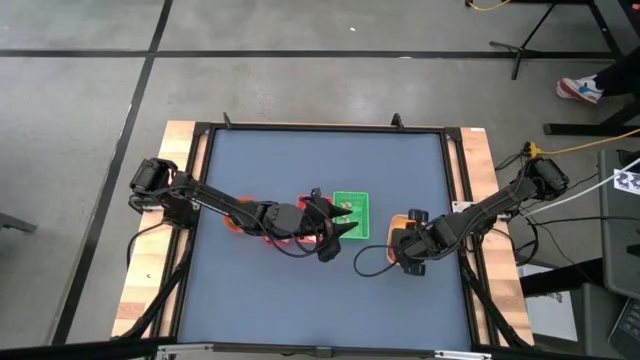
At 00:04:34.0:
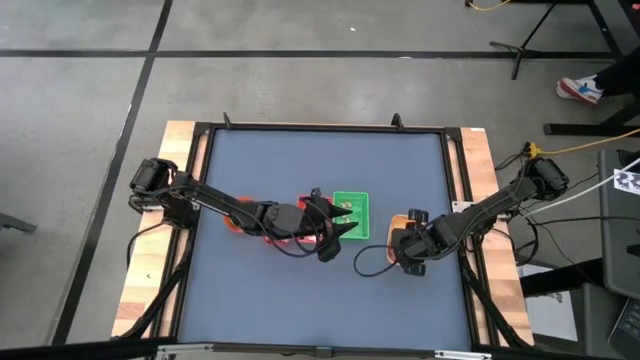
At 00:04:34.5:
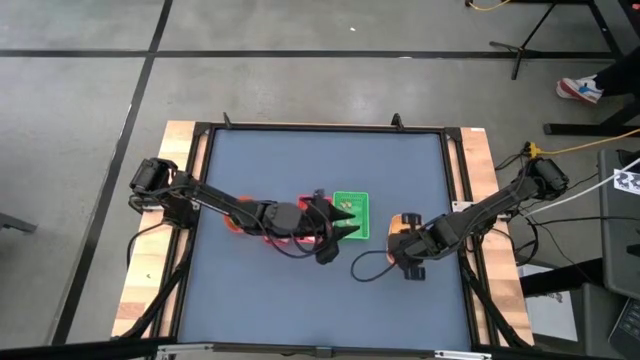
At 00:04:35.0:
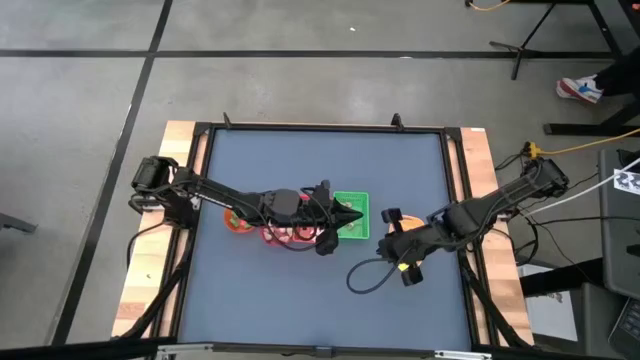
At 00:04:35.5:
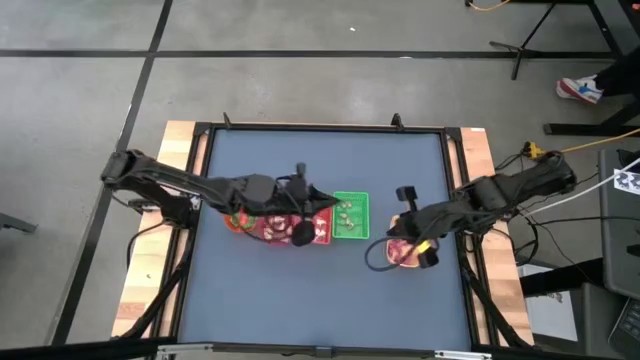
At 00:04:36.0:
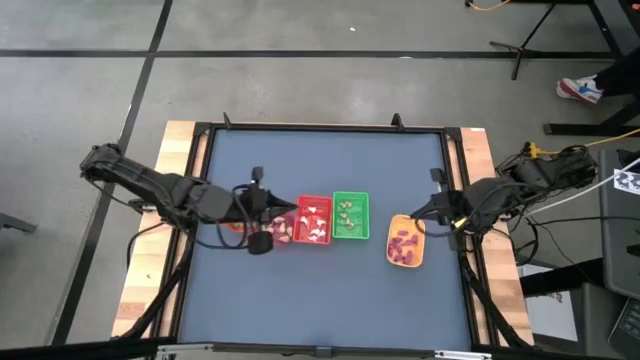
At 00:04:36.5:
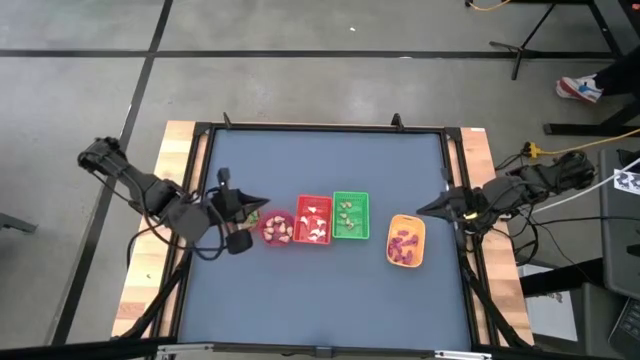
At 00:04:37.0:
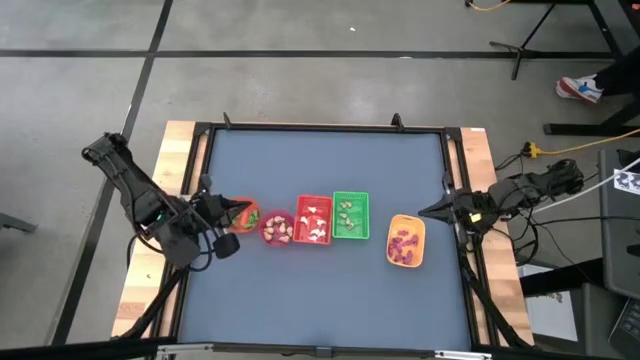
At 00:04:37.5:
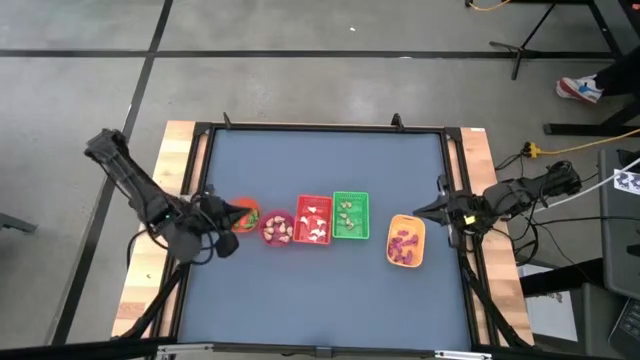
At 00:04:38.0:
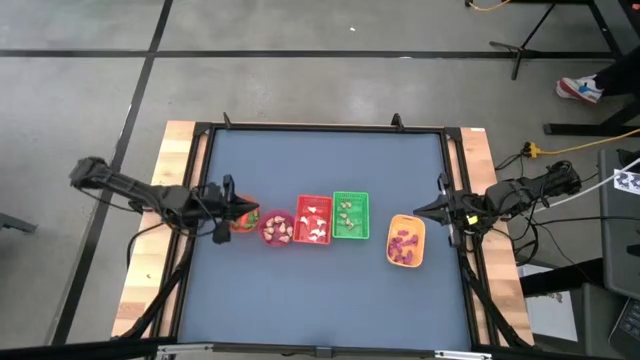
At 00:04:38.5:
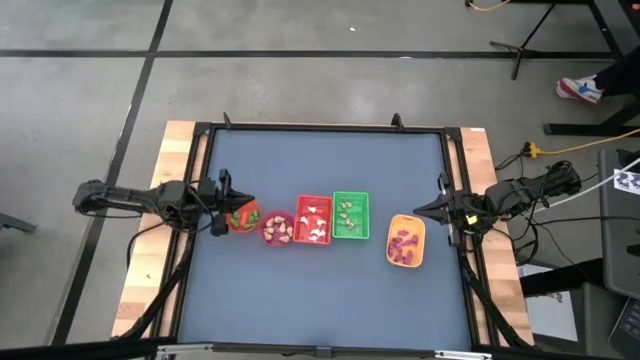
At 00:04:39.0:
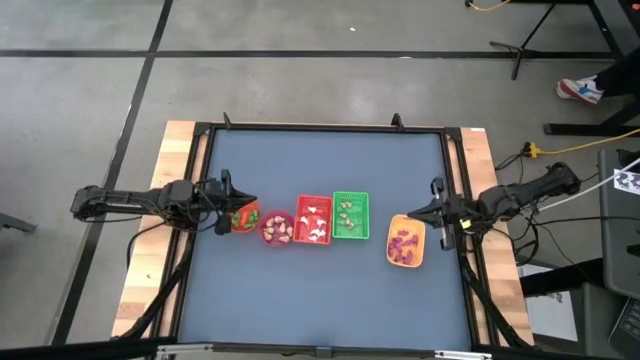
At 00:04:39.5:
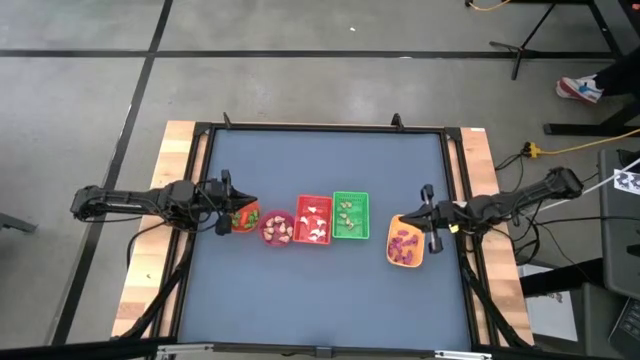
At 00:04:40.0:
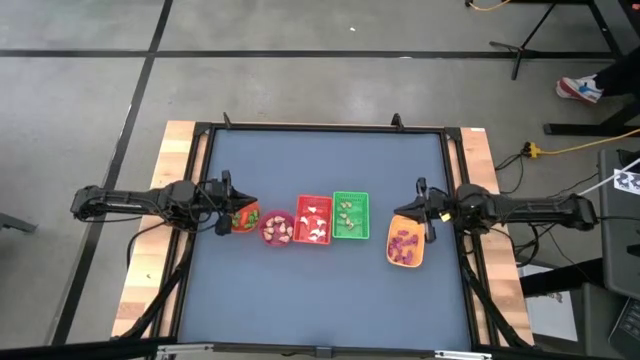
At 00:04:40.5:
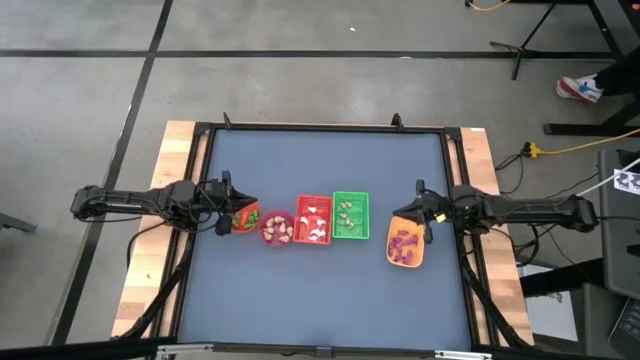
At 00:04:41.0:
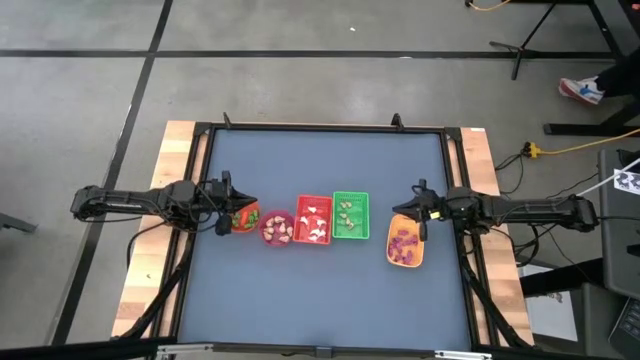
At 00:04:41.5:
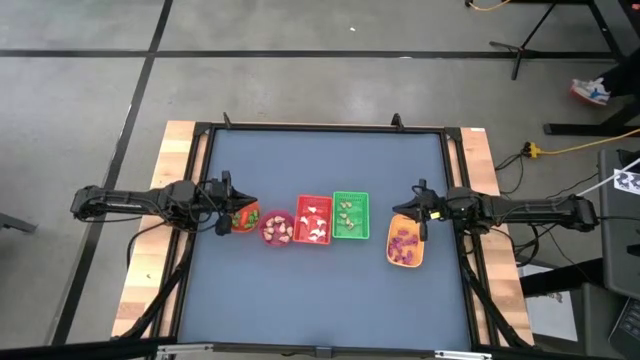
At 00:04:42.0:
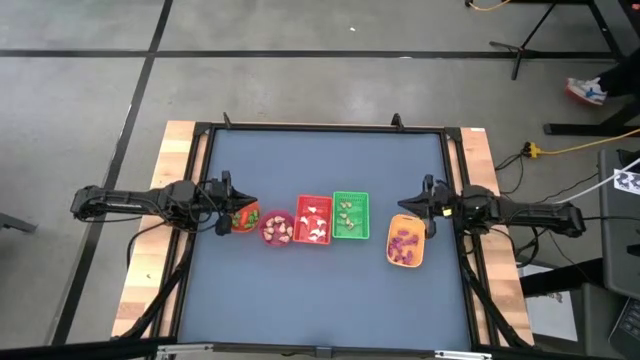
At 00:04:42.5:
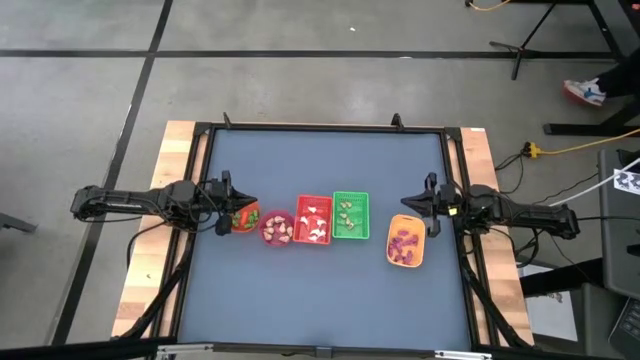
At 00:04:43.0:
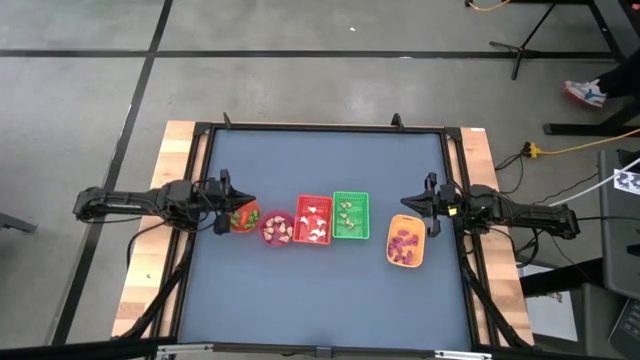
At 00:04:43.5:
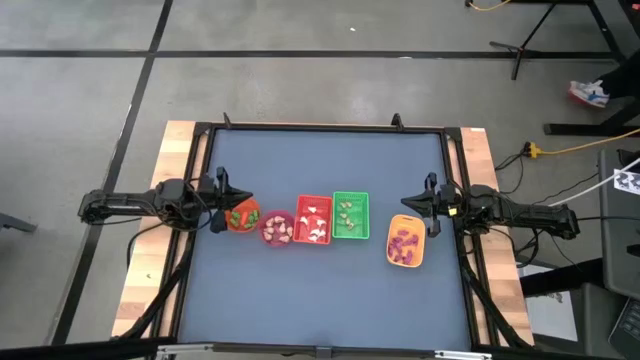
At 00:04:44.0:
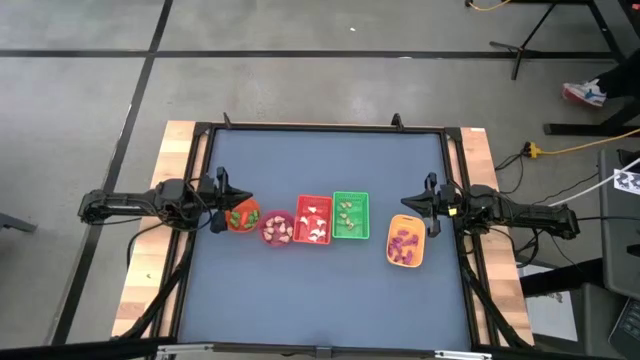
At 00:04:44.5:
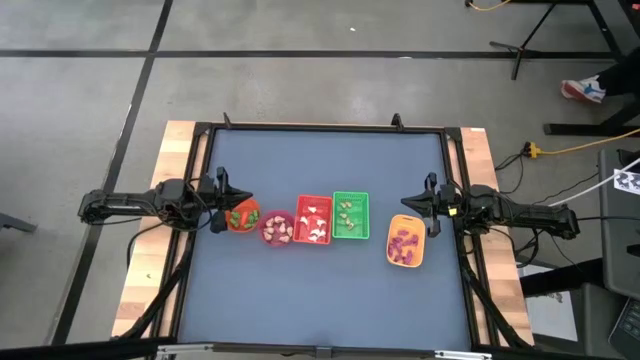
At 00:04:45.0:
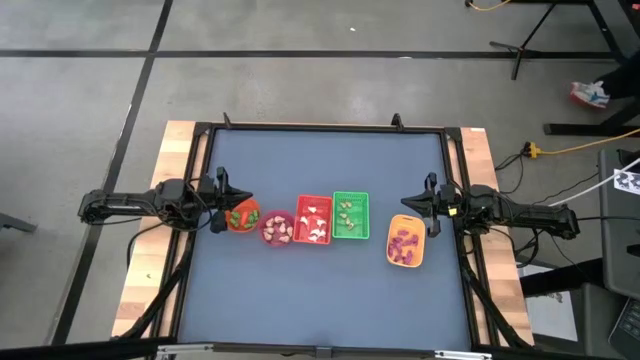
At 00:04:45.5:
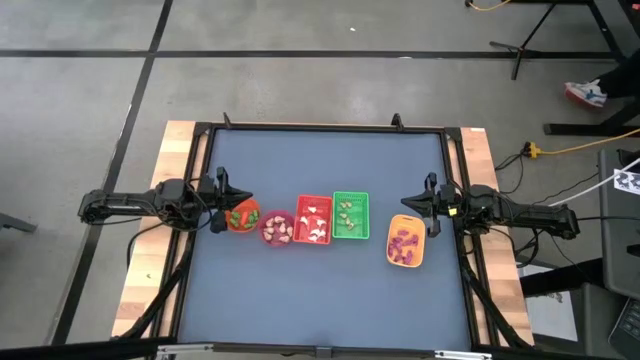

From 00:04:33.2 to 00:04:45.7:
Task: Sort Halloween decoration
Return to Home Position
